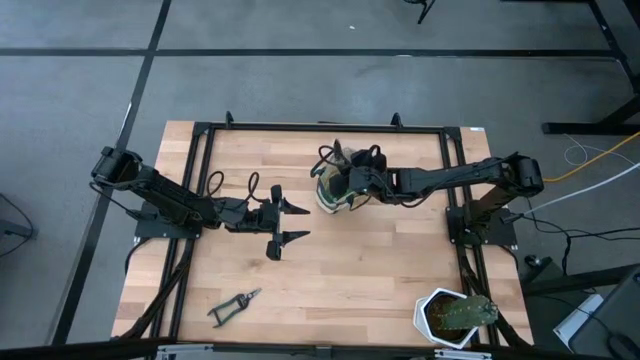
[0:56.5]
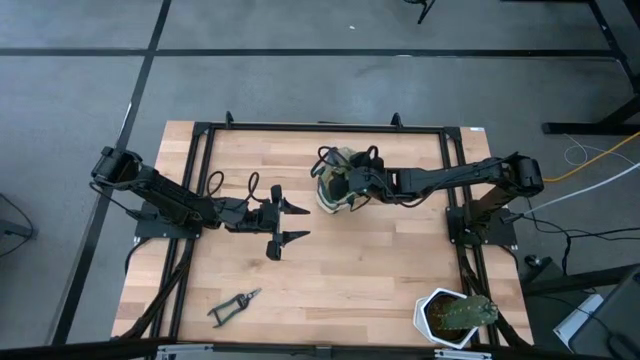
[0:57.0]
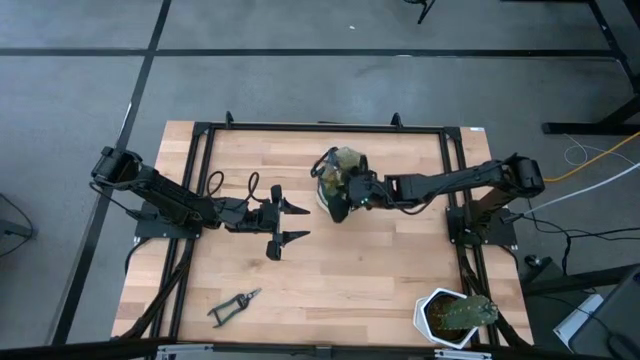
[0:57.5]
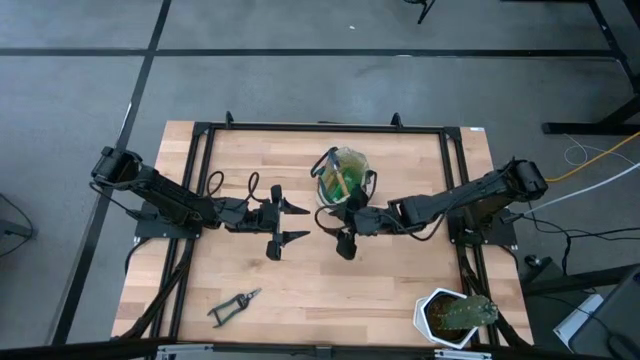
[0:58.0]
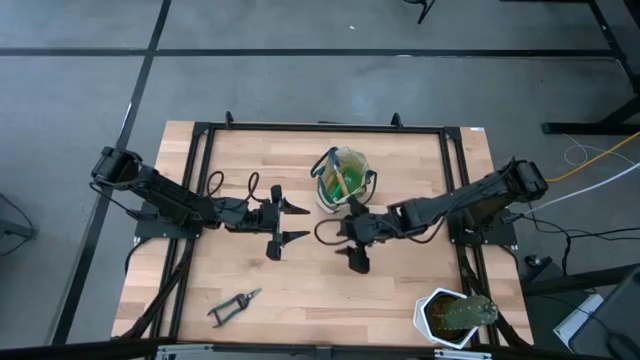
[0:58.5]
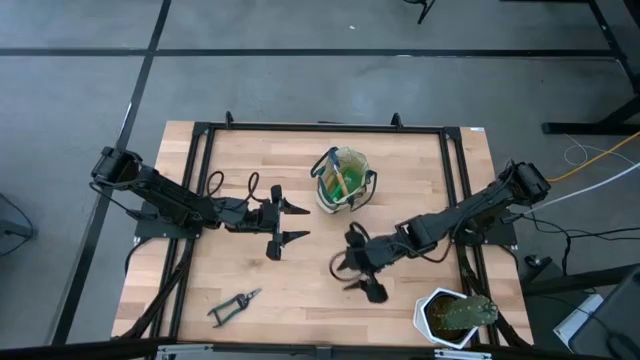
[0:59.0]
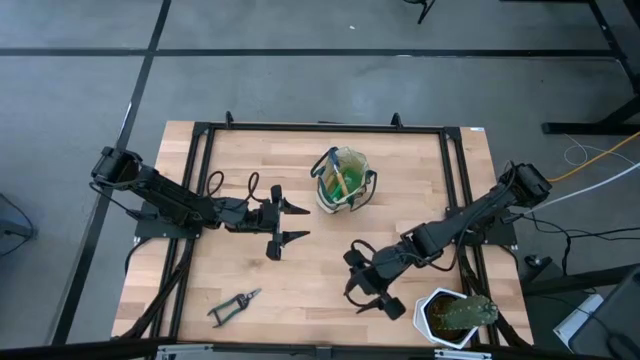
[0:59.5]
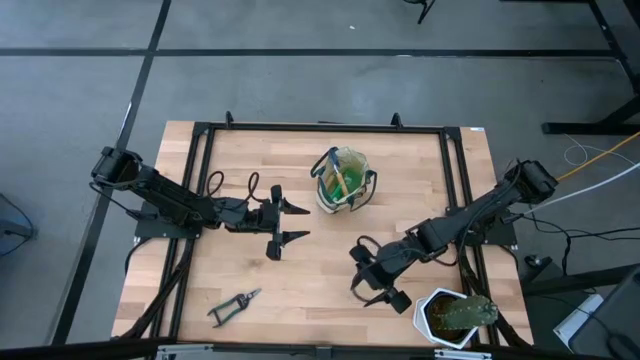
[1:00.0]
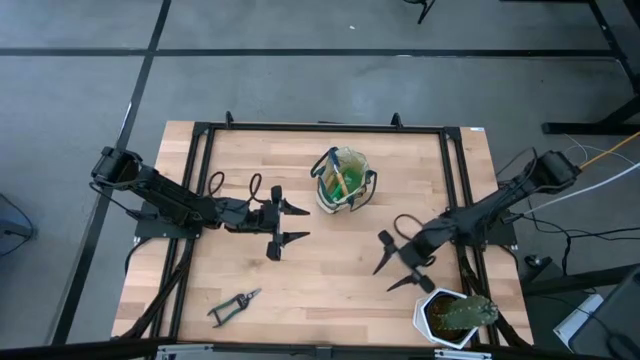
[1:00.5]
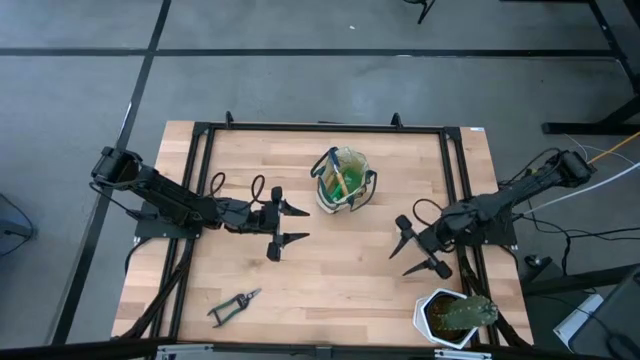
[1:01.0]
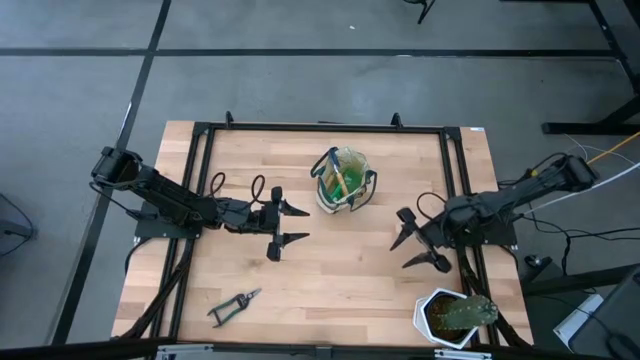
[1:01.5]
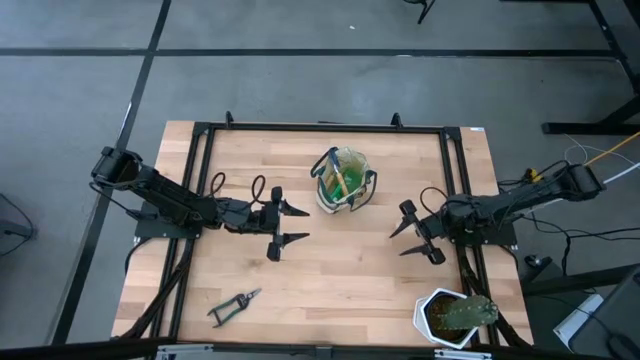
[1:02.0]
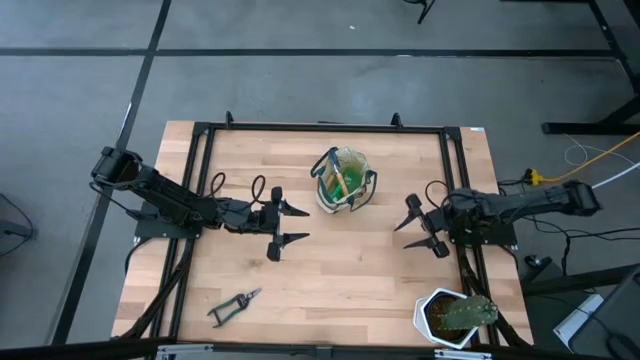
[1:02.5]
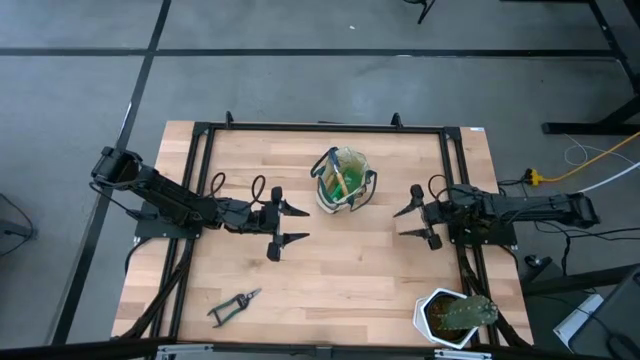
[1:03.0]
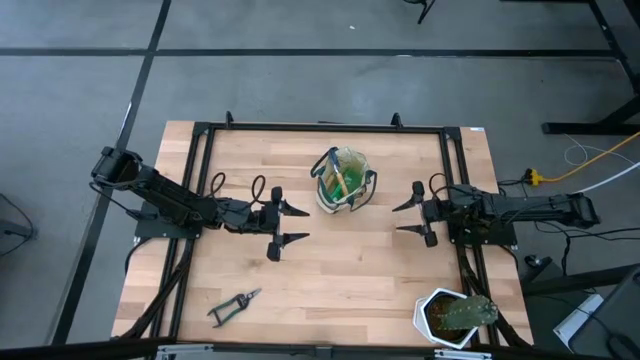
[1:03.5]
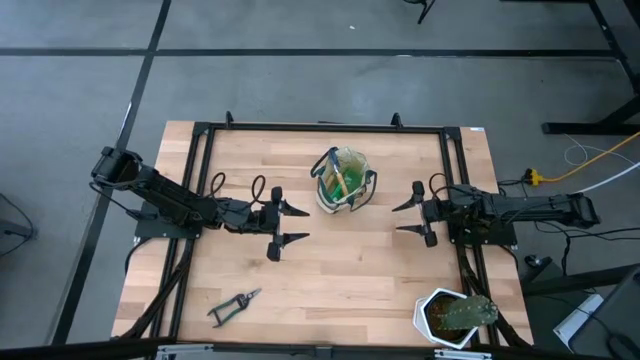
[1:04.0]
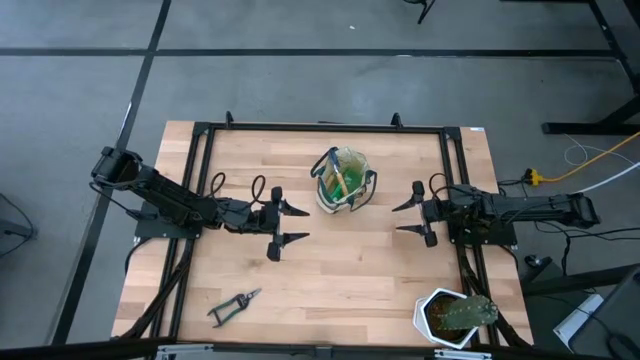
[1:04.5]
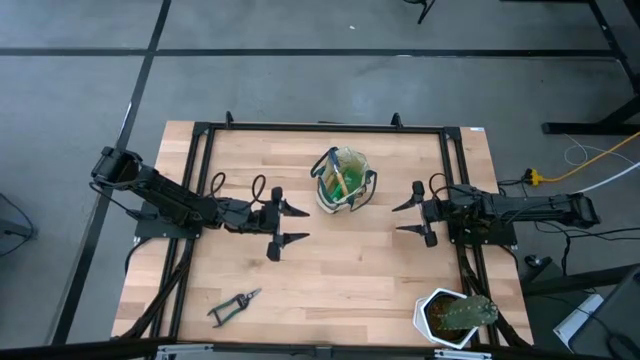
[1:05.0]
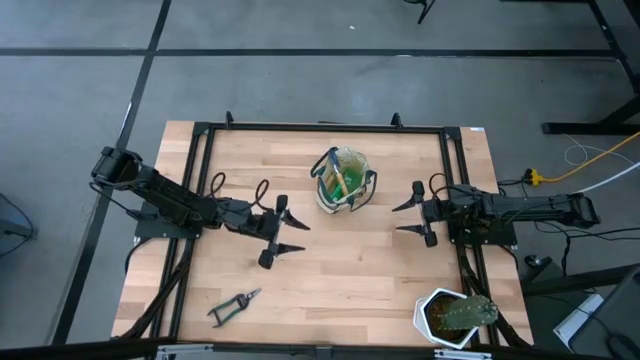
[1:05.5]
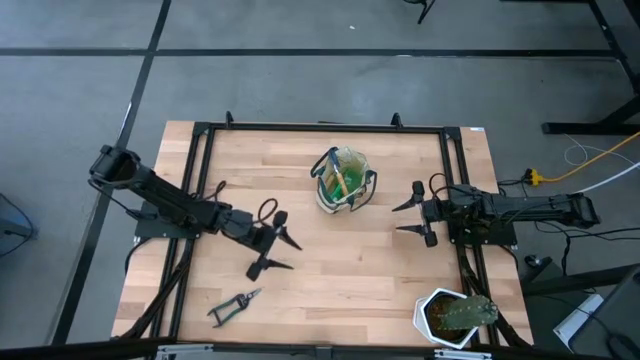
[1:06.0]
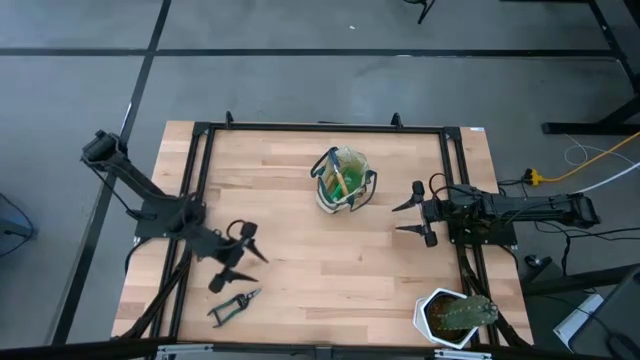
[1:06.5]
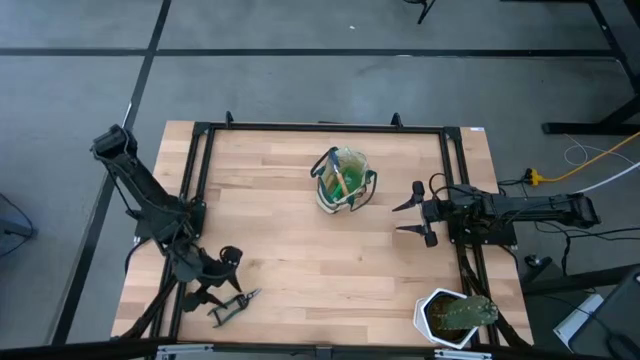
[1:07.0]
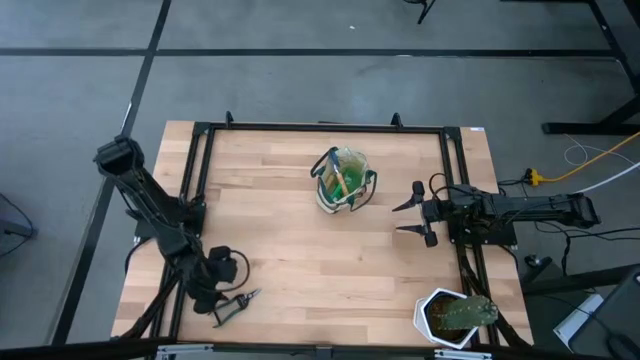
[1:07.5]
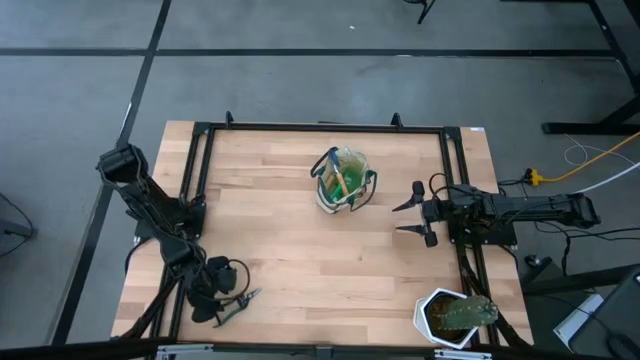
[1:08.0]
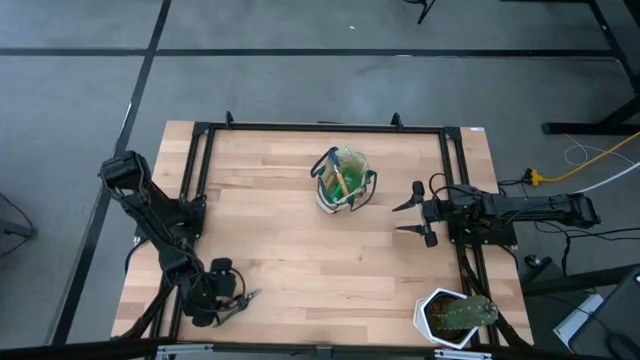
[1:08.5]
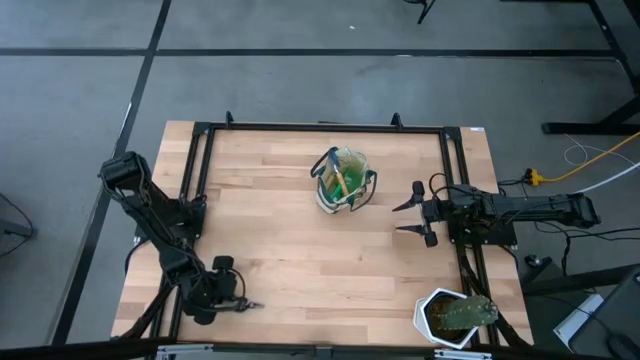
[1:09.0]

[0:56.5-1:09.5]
Task: Pick & Place Garden tools in Gardening bag
Put the shear scissors into the gardening bag

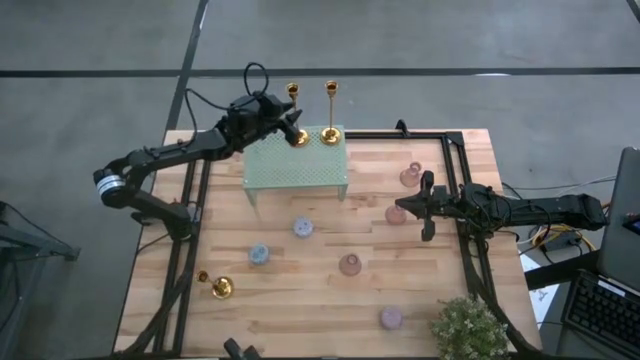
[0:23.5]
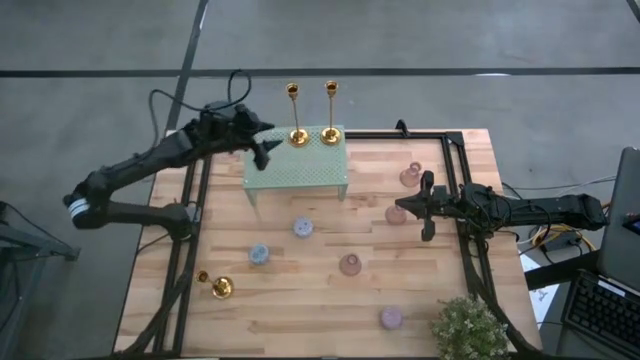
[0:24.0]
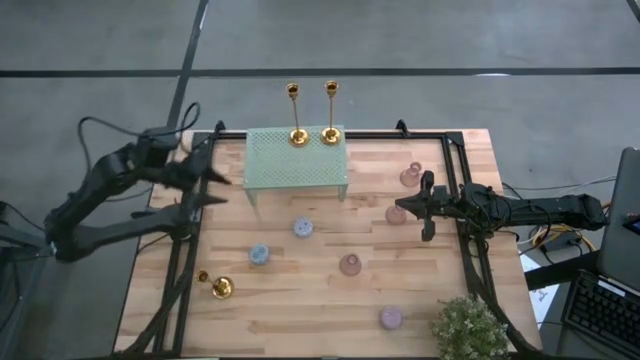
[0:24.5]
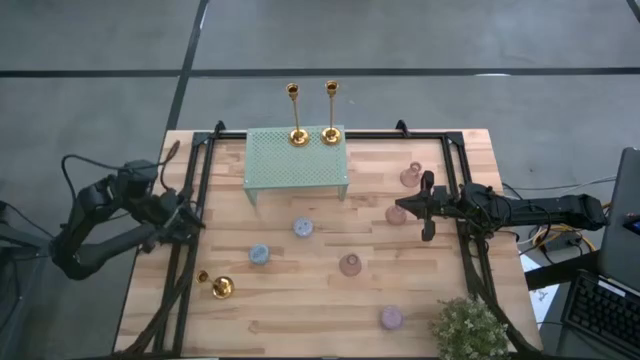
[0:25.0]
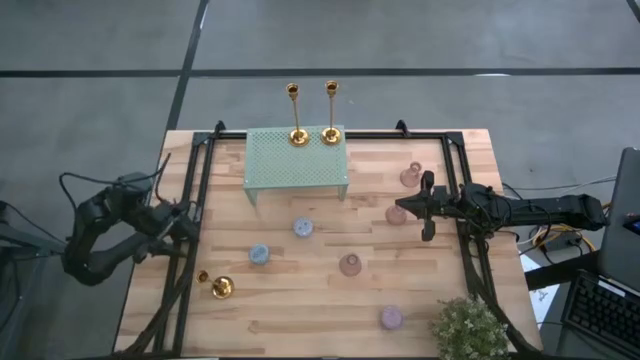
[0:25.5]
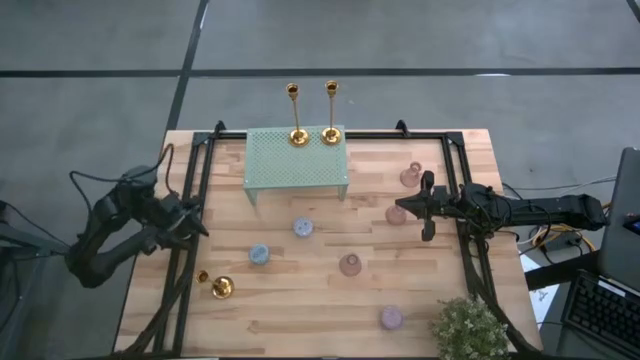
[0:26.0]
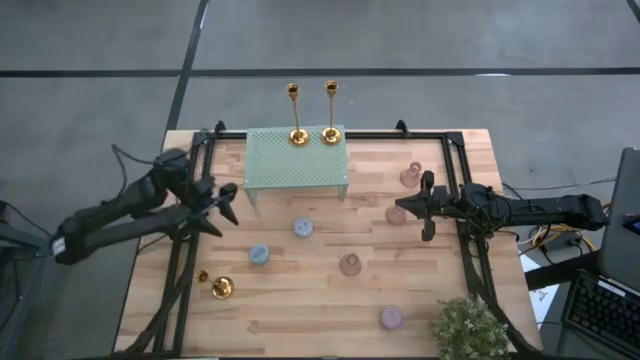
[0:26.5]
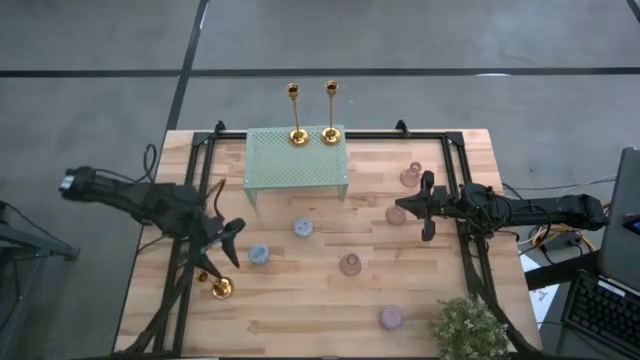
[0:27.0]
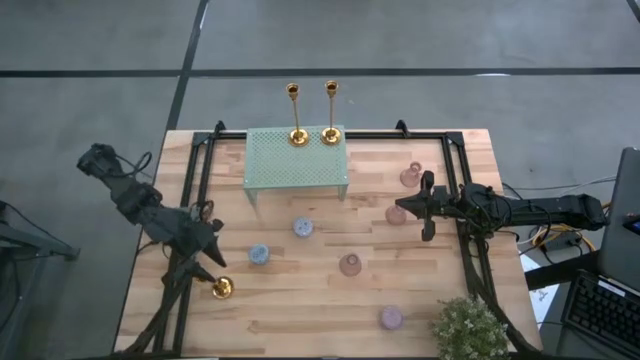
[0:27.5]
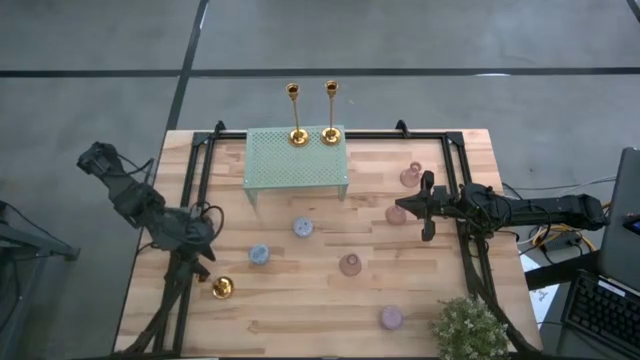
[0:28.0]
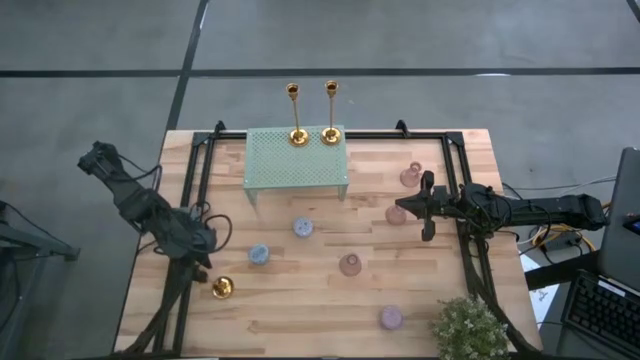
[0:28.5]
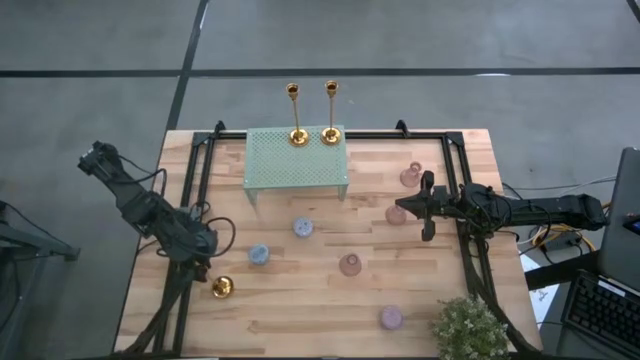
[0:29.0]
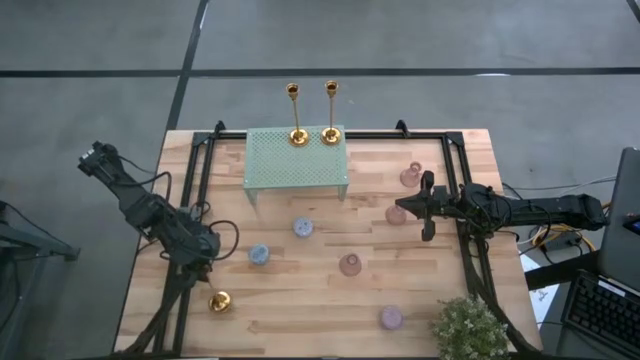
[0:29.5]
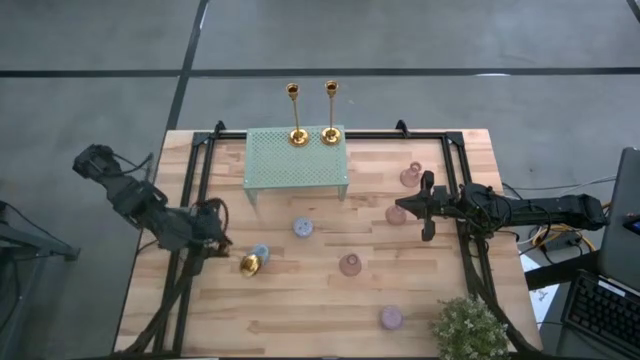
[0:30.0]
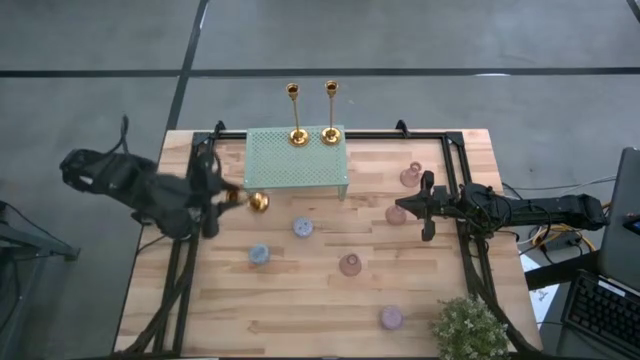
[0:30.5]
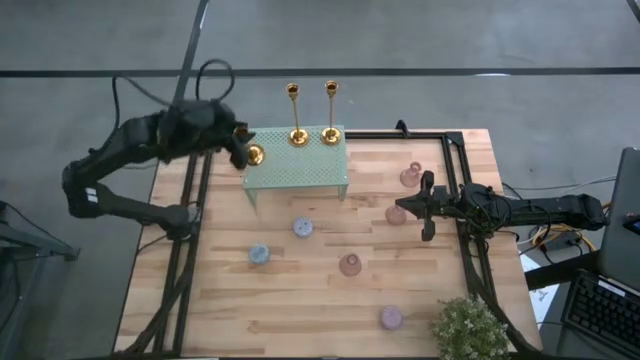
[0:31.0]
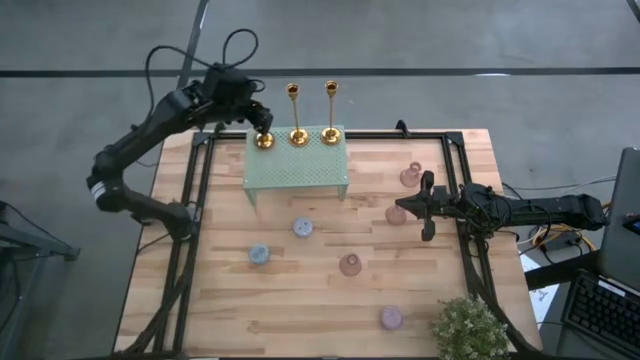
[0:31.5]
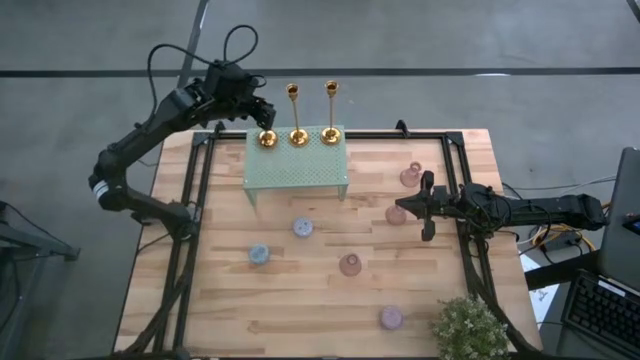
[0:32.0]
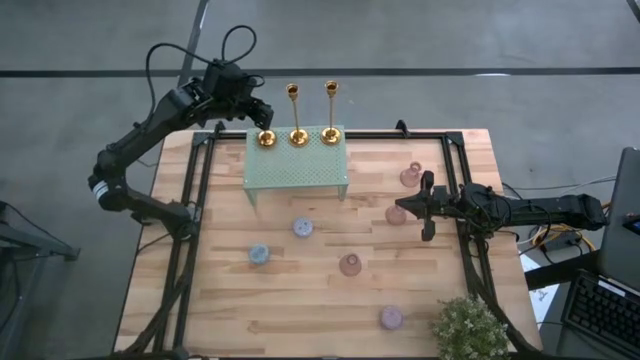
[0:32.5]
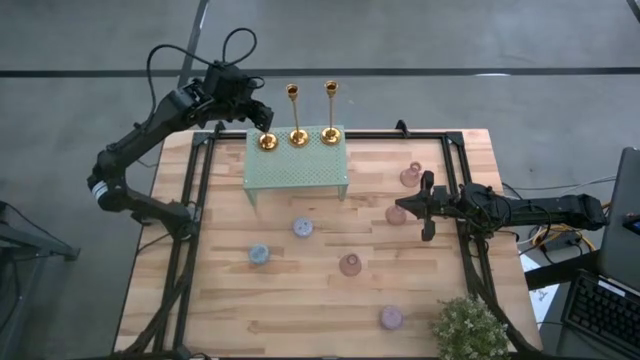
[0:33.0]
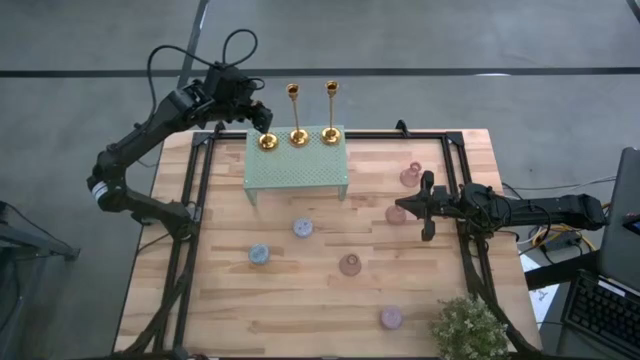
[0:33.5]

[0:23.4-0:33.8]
Task: Pick & Place candle stick holders
Put the gold candle holder on the shelf
